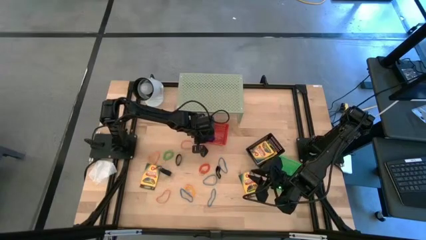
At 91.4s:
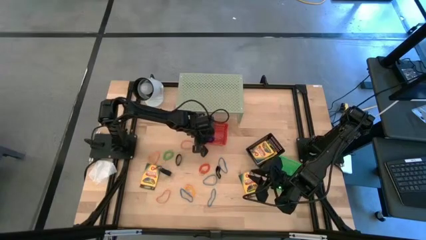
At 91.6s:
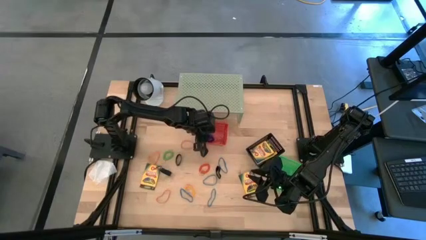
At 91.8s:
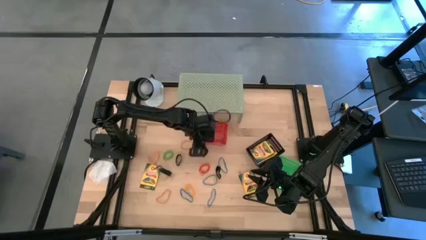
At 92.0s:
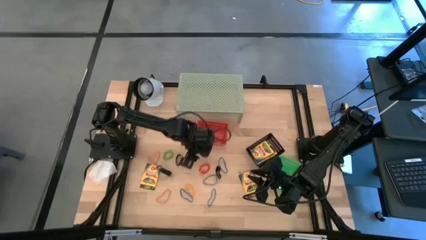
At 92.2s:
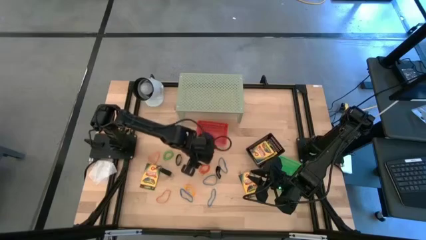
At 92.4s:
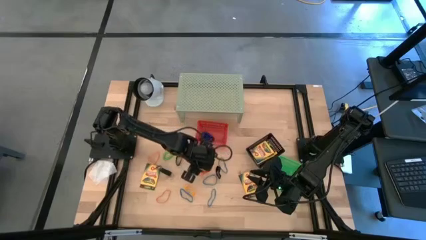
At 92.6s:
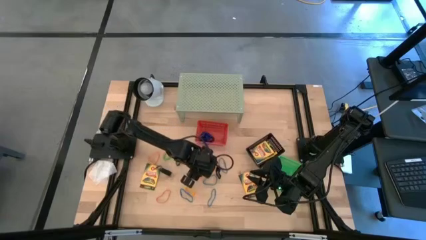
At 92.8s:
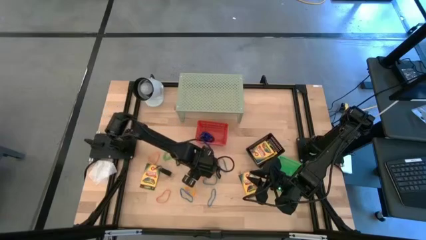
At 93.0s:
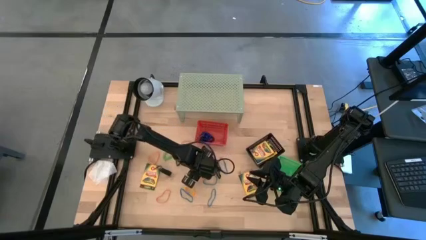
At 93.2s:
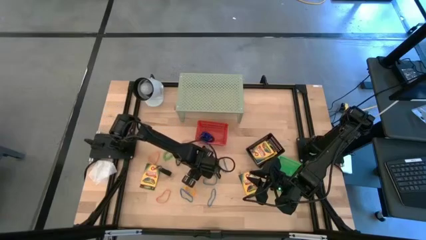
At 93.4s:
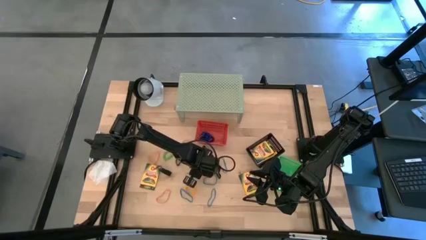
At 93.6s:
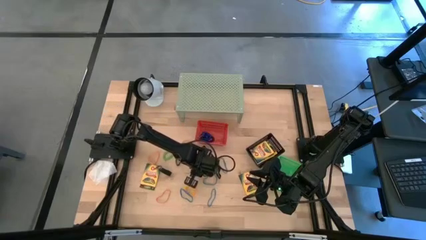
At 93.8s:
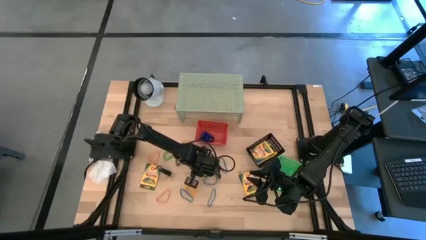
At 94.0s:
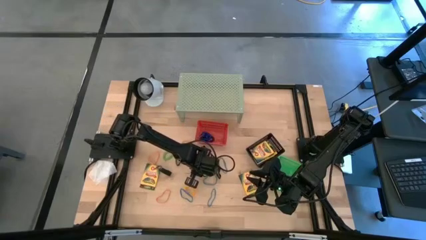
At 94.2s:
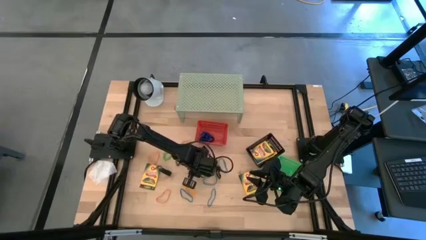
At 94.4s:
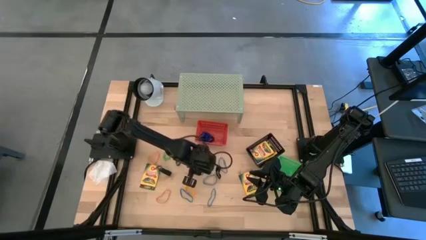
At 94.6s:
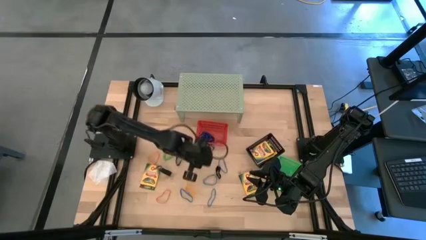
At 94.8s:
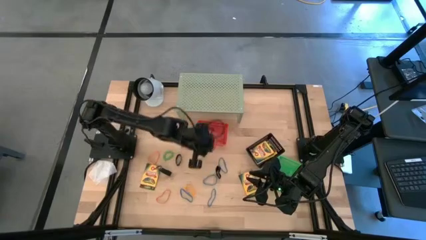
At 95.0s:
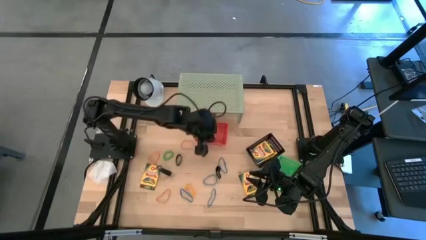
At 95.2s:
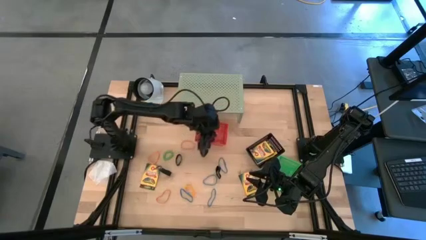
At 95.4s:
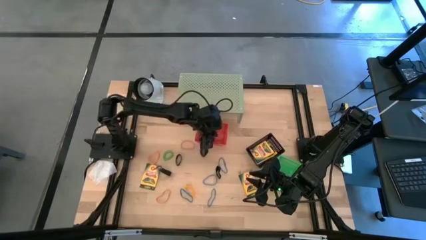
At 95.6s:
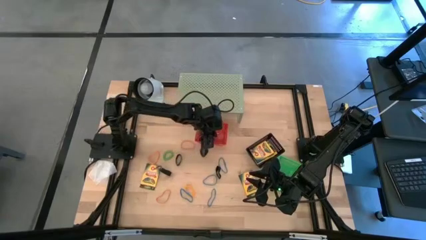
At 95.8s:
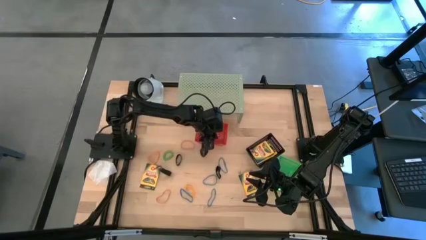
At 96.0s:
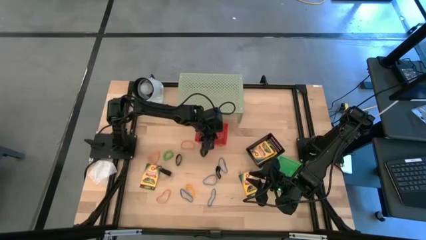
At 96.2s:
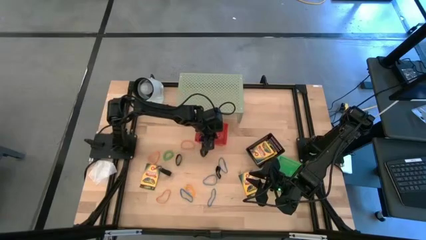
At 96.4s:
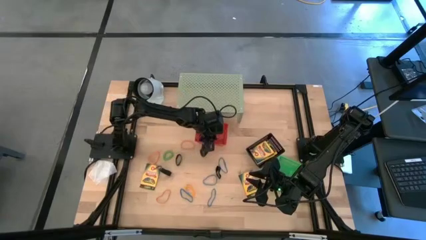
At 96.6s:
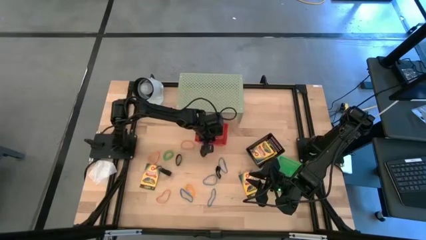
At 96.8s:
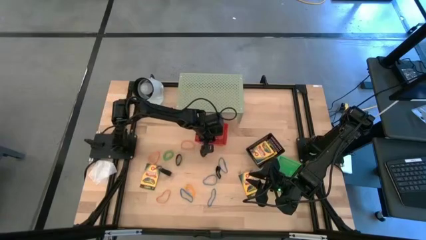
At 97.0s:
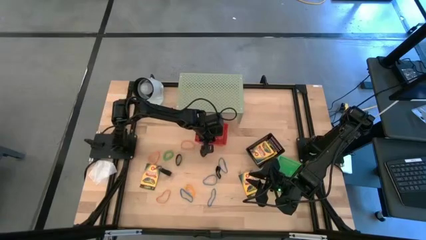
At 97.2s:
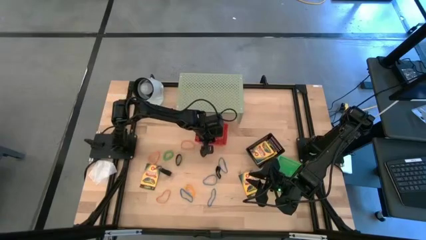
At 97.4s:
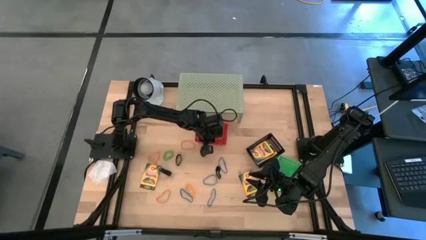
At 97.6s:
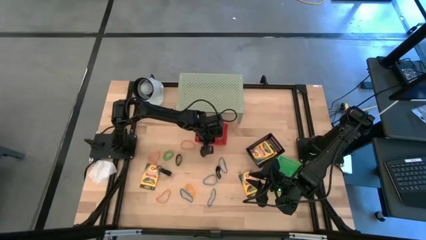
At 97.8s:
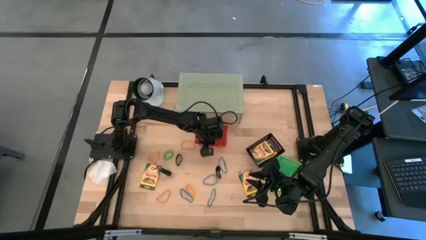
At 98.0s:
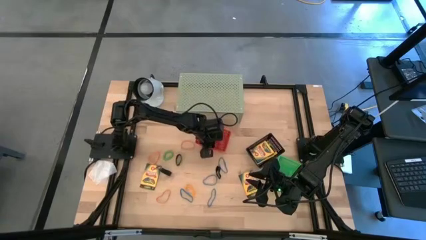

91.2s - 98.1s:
Task: Pick & Place Office Desk Supplies
Put the orange spring keychain into the red bin

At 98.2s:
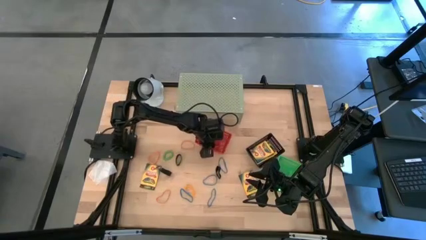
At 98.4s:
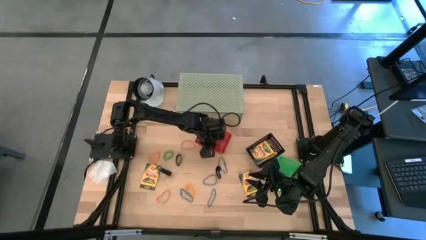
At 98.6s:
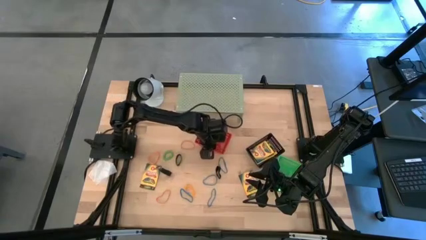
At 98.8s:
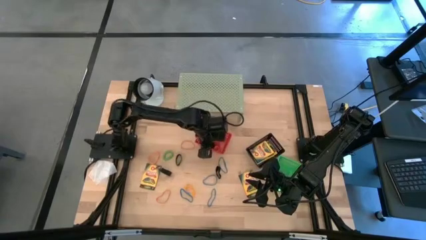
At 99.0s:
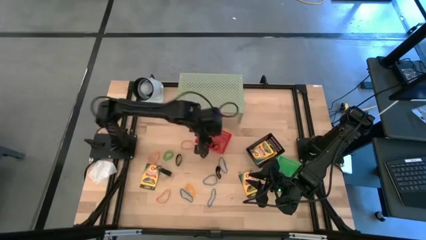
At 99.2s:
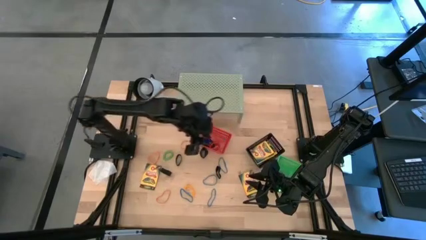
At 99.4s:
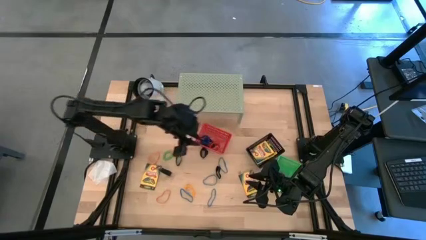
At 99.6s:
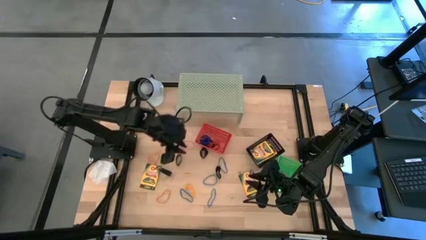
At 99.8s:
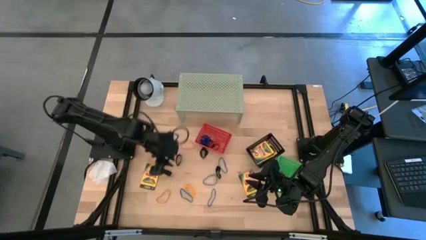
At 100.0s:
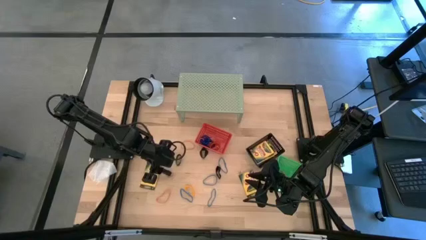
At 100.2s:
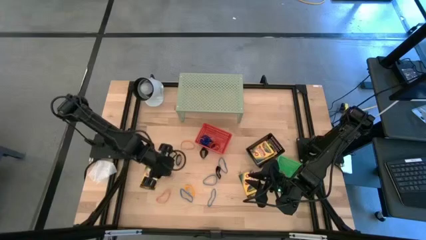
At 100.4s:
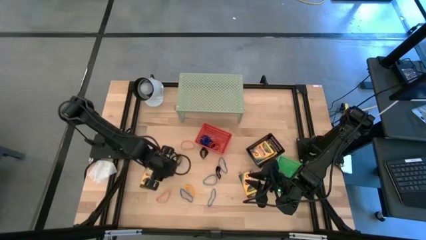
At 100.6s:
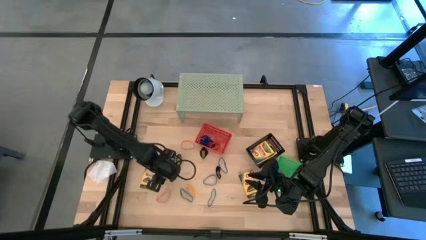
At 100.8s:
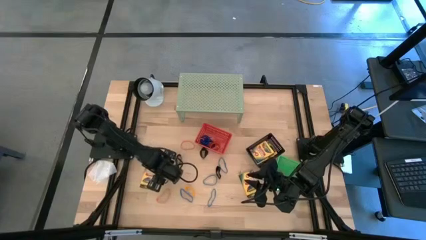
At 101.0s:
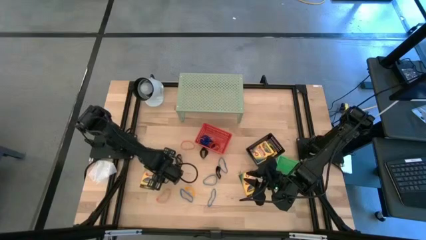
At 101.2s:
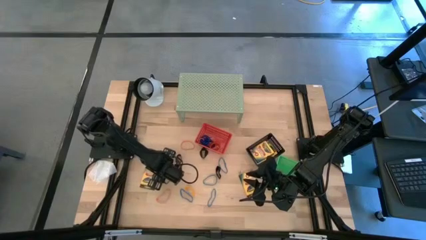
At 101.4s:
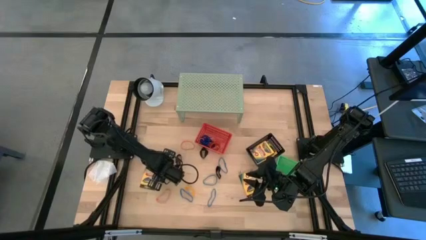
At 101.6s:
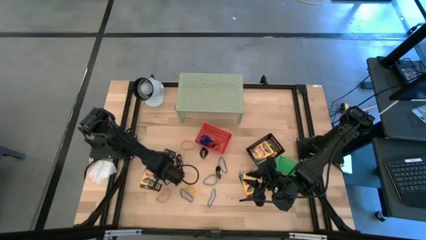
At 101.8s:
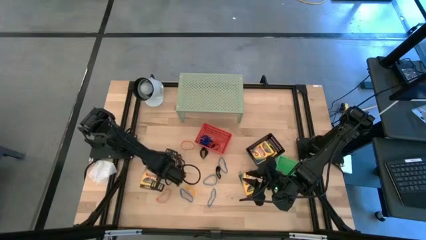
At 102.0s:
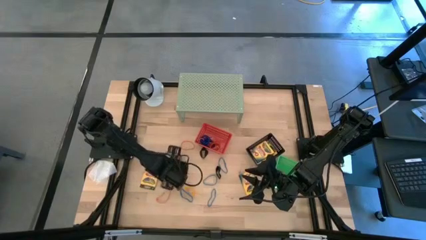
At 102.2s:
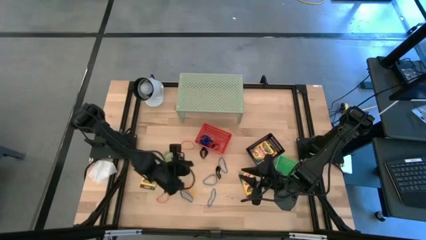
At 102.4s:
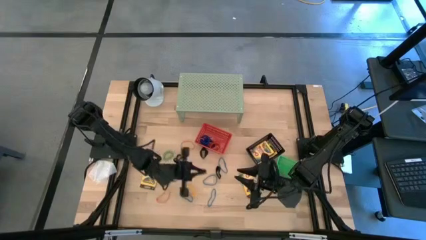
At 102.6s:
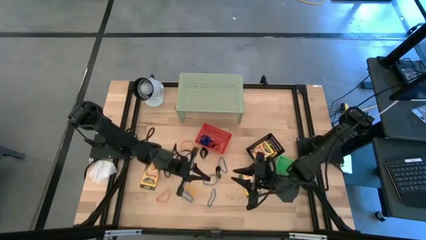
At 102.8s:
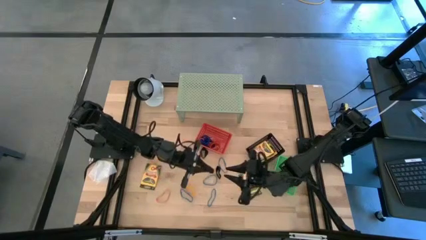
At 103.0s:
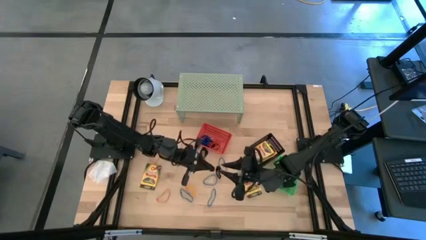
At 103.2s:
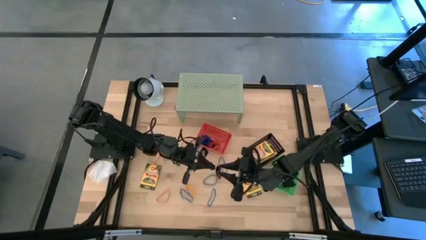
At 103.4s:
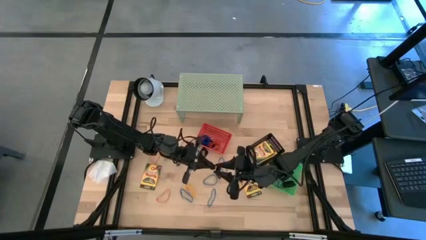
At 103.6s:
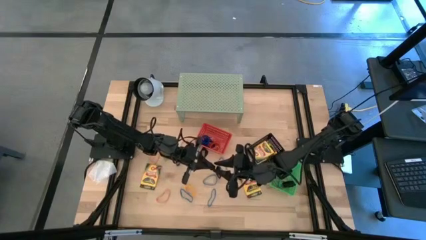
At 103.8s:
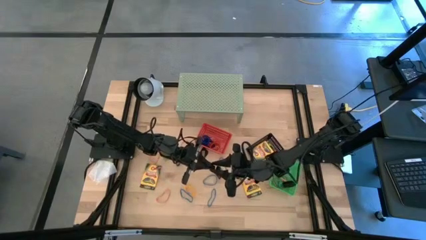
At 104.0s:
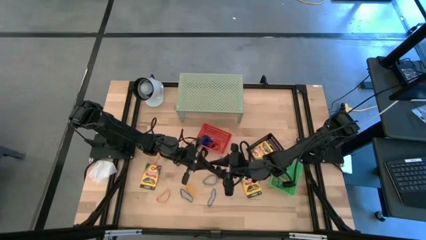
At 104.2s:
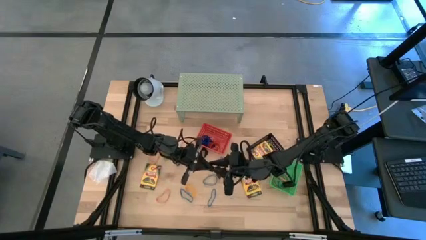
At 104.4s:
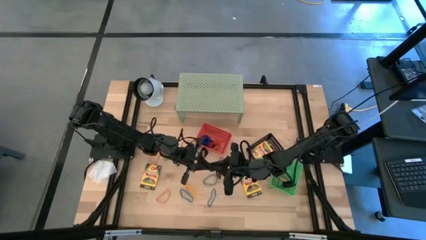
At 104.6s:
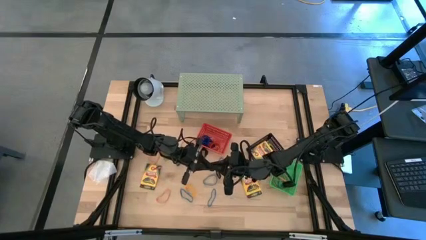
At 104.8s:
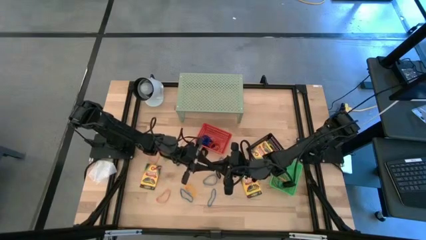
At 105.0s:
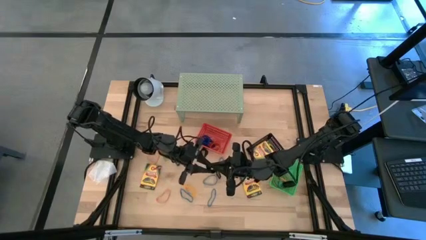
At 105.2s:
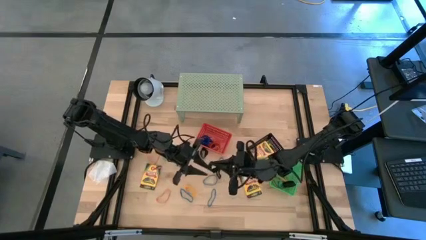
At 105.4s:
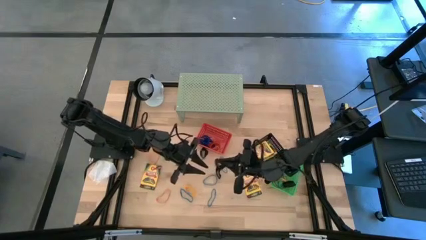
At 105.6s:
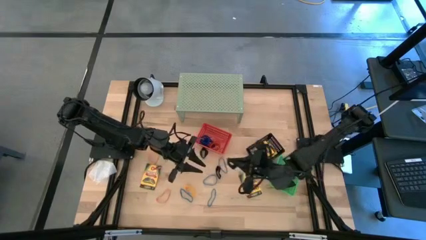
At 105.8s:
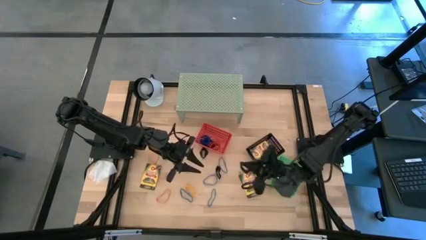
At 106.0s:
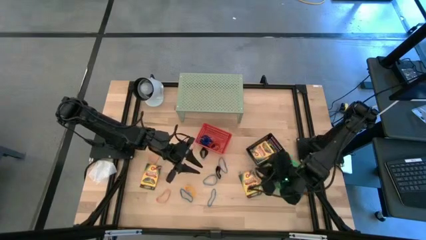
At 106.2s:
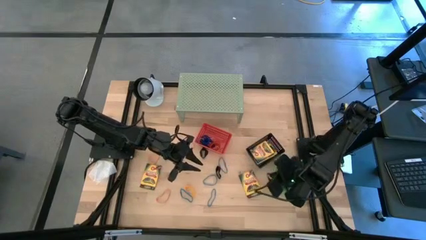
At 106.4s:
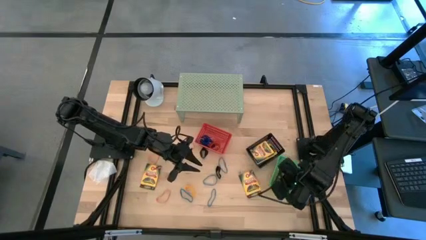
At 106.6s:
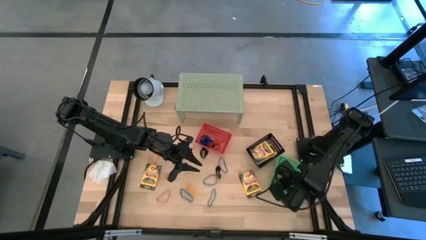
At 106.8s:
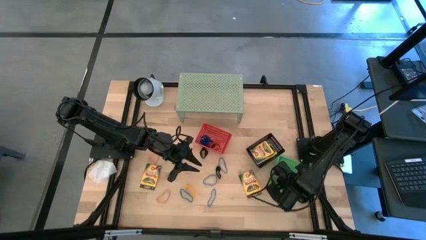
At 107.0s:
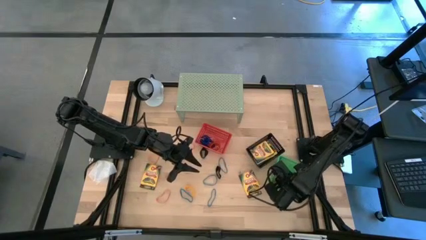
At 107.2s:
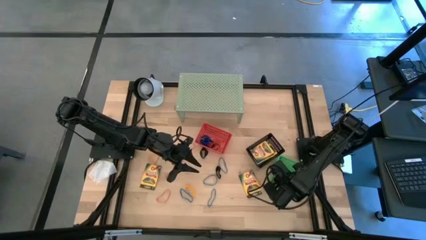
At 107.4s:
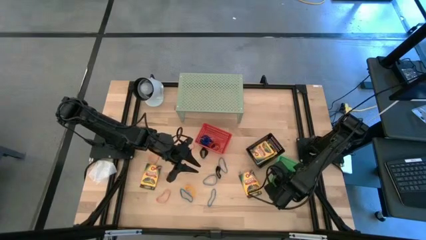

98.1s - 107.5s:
Put the black rubber band into the green bin
